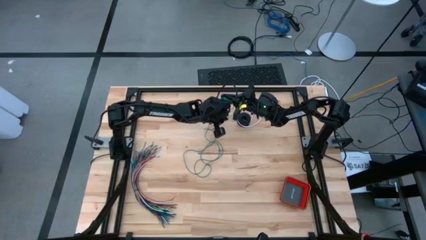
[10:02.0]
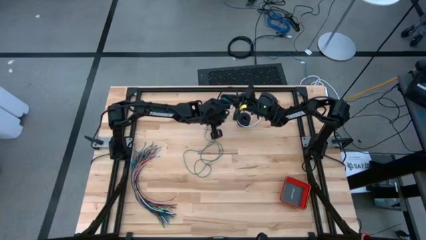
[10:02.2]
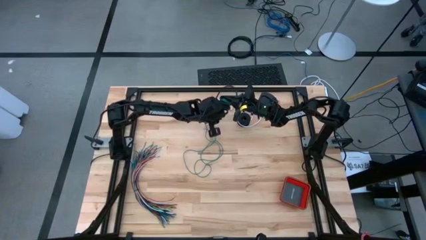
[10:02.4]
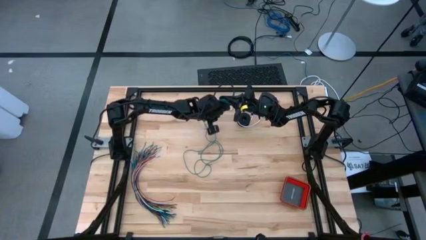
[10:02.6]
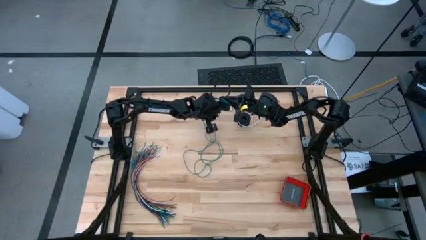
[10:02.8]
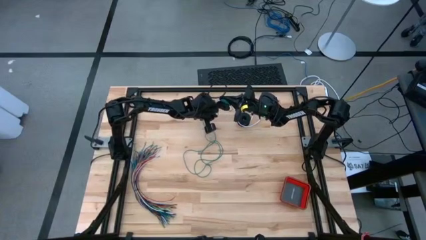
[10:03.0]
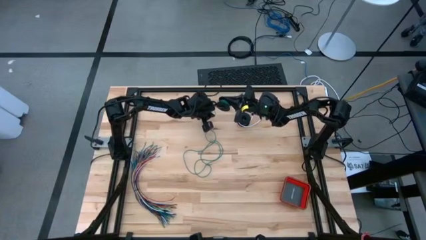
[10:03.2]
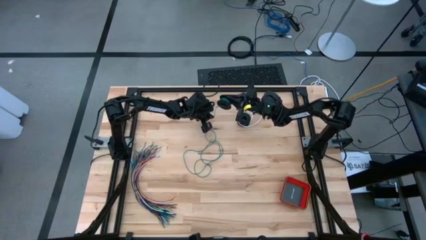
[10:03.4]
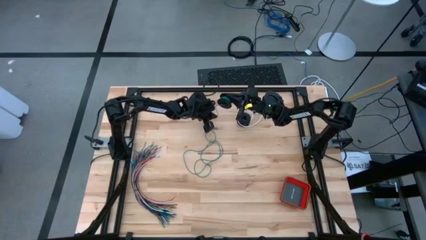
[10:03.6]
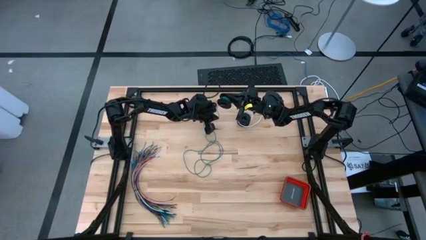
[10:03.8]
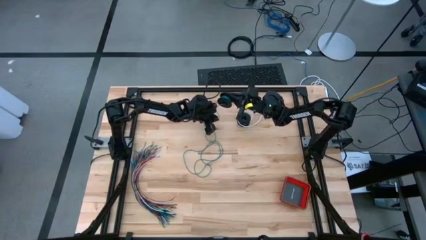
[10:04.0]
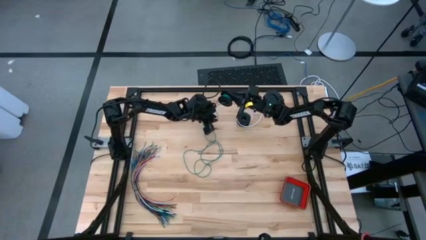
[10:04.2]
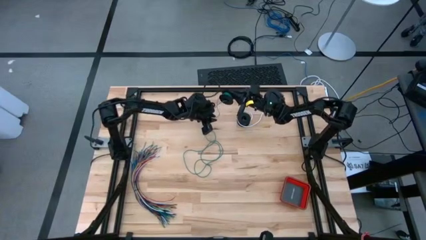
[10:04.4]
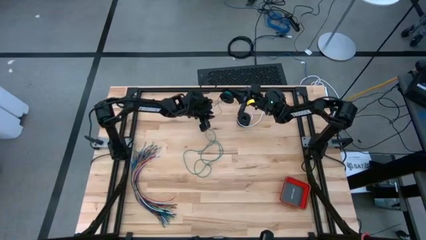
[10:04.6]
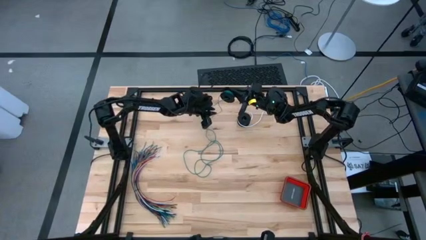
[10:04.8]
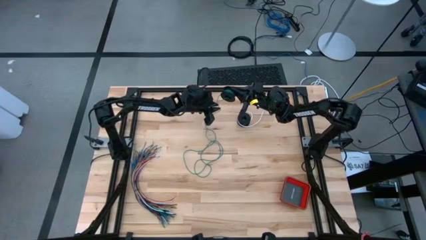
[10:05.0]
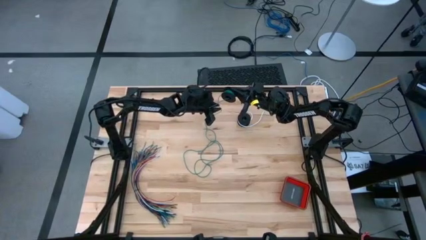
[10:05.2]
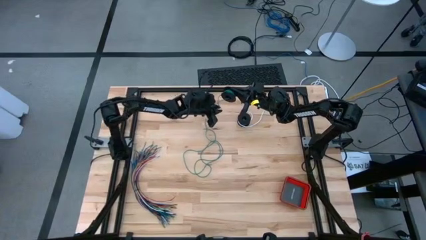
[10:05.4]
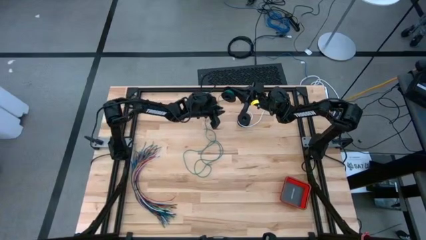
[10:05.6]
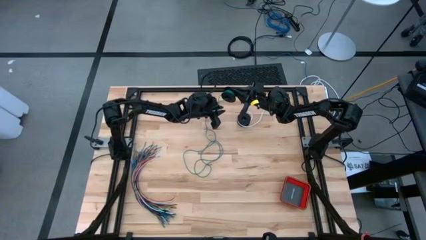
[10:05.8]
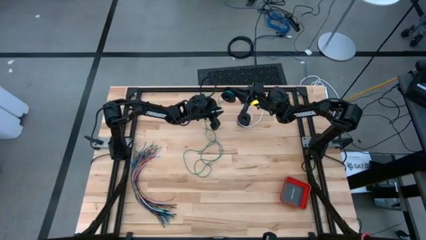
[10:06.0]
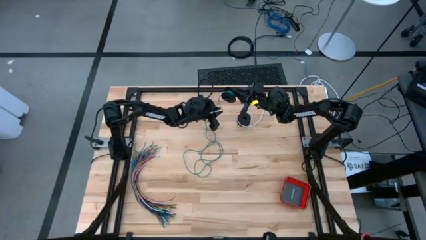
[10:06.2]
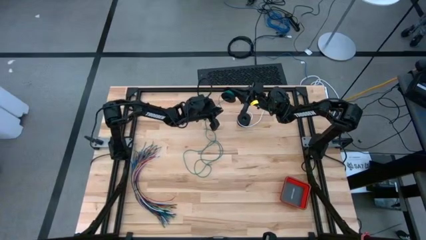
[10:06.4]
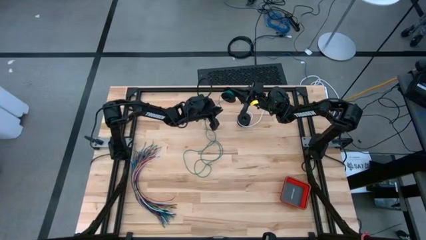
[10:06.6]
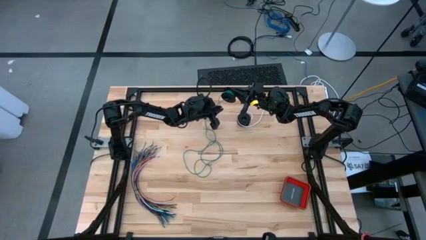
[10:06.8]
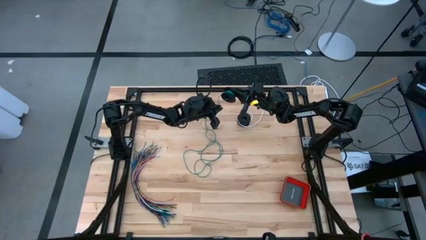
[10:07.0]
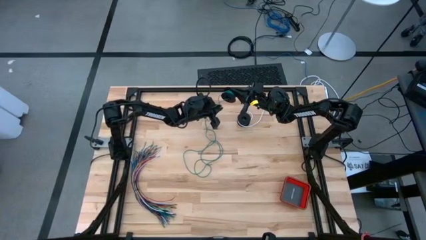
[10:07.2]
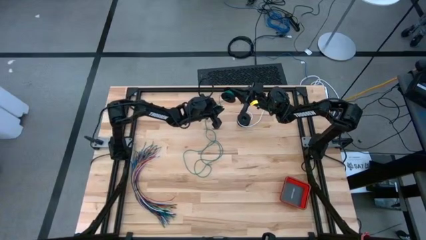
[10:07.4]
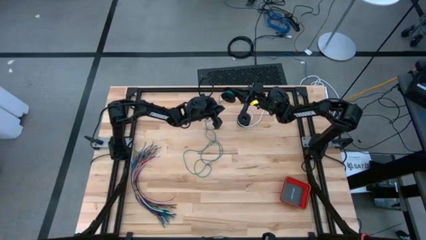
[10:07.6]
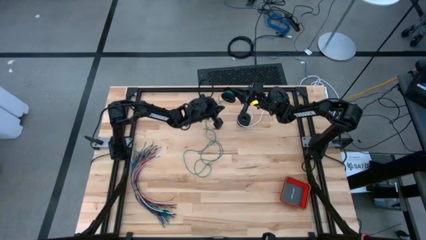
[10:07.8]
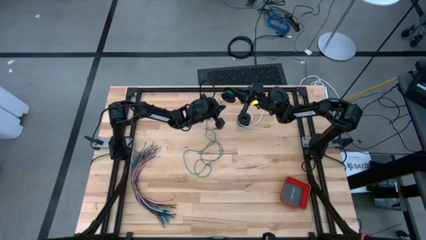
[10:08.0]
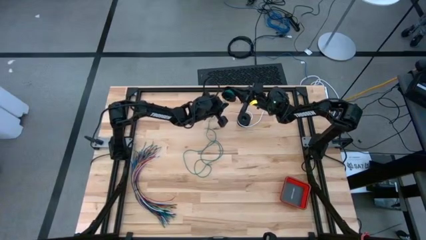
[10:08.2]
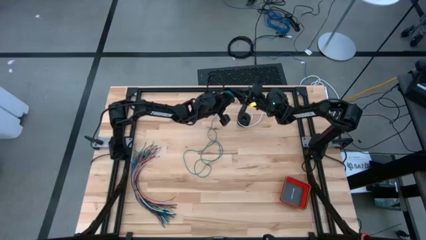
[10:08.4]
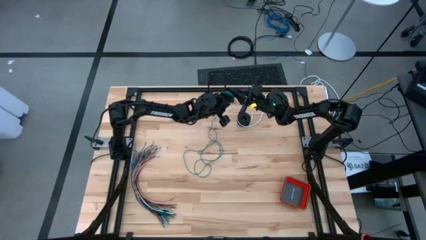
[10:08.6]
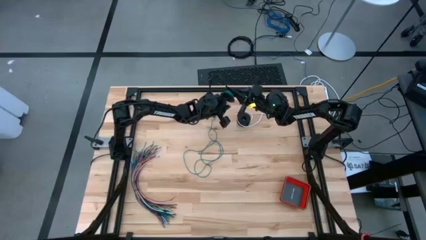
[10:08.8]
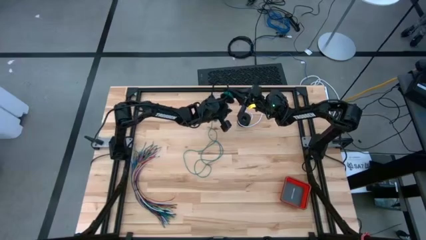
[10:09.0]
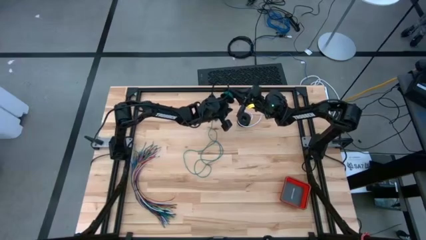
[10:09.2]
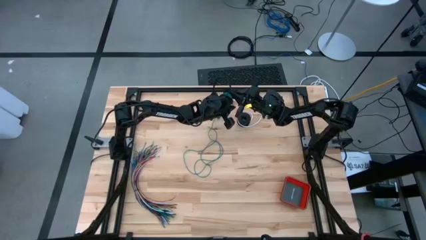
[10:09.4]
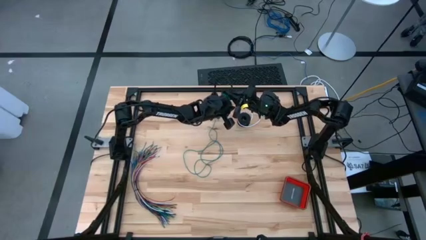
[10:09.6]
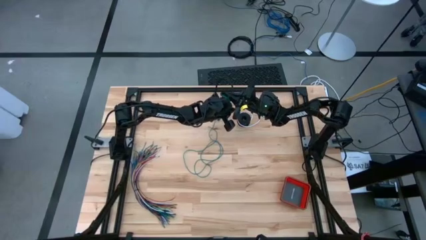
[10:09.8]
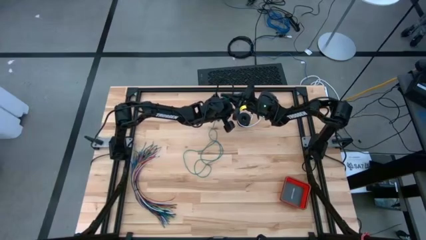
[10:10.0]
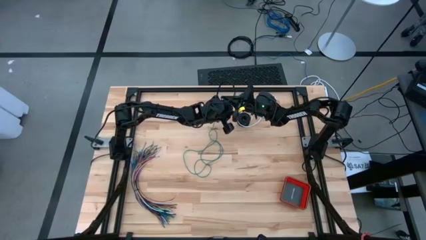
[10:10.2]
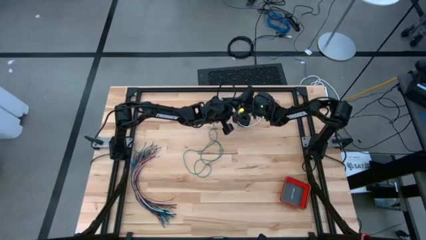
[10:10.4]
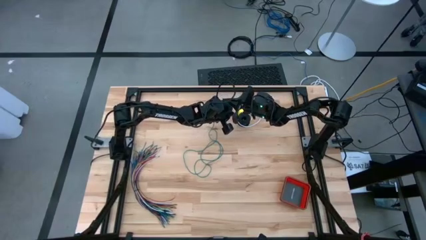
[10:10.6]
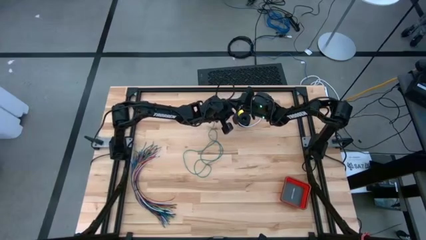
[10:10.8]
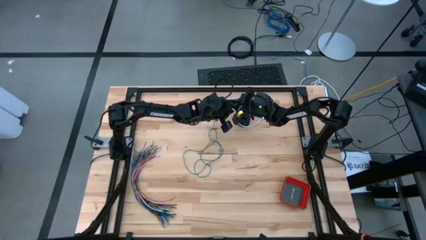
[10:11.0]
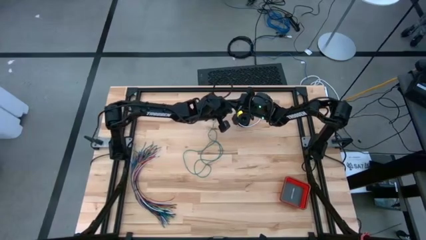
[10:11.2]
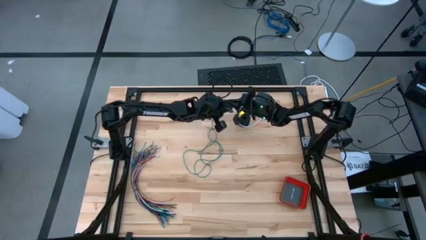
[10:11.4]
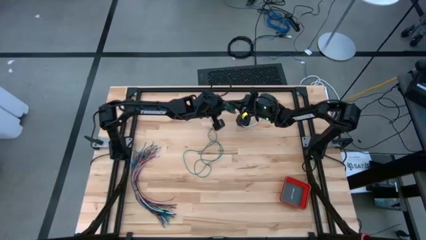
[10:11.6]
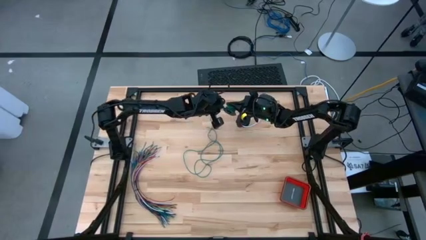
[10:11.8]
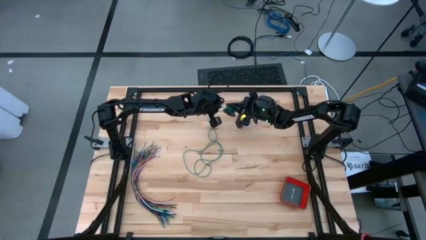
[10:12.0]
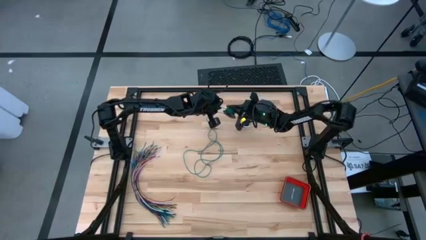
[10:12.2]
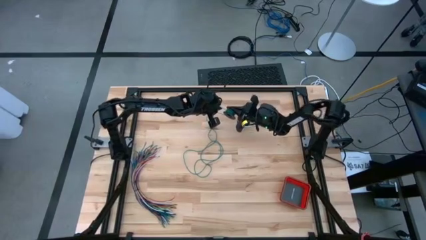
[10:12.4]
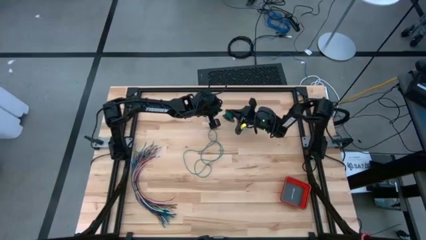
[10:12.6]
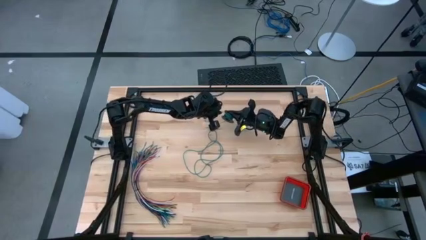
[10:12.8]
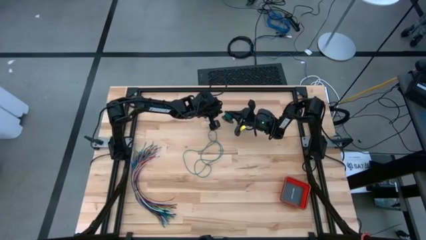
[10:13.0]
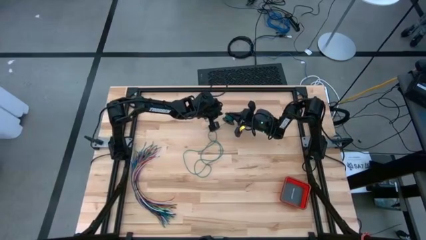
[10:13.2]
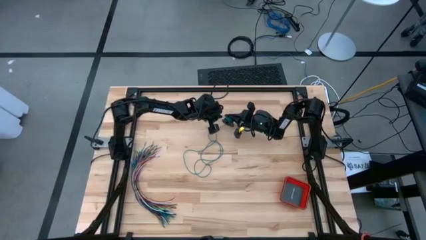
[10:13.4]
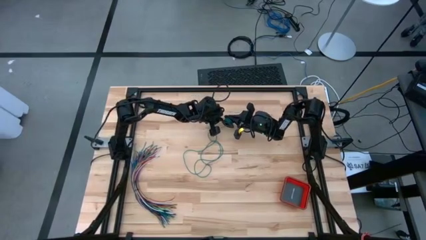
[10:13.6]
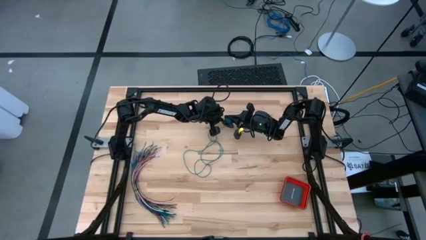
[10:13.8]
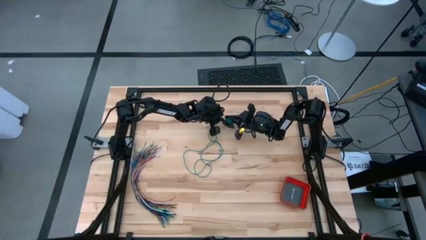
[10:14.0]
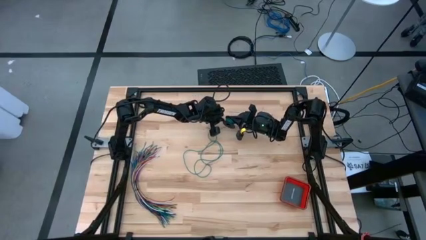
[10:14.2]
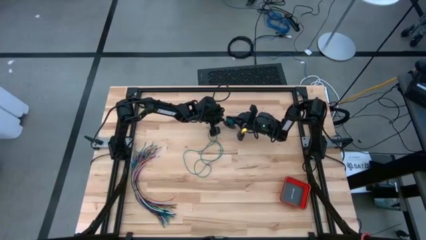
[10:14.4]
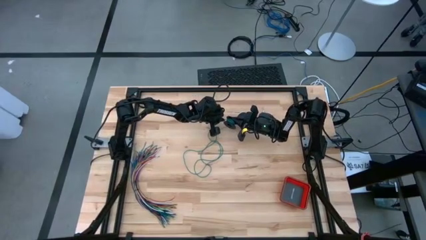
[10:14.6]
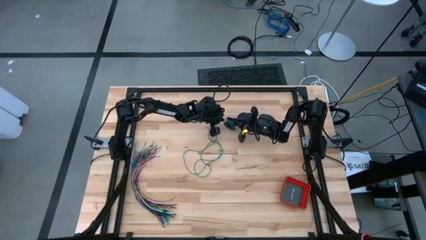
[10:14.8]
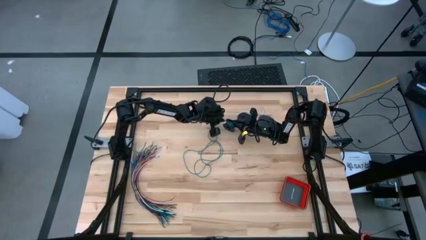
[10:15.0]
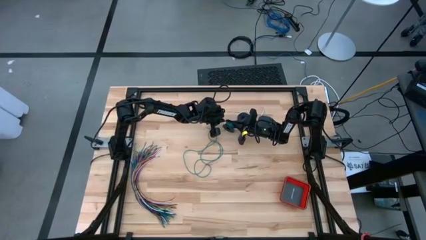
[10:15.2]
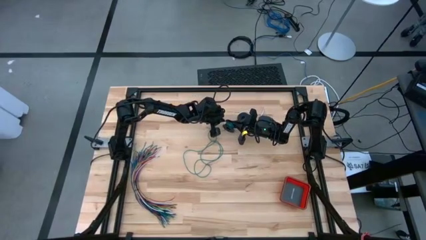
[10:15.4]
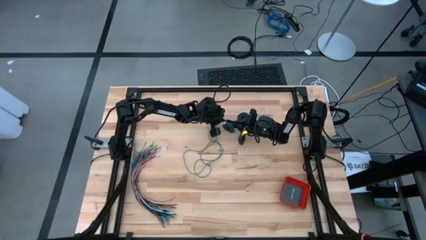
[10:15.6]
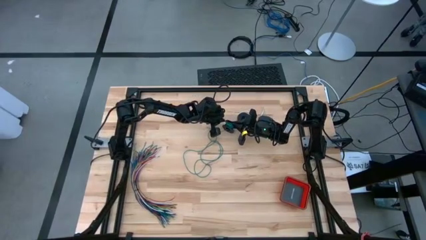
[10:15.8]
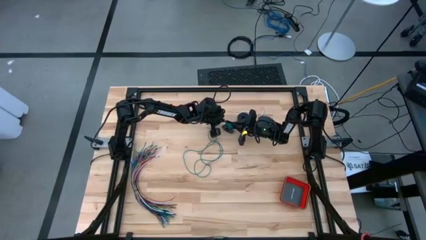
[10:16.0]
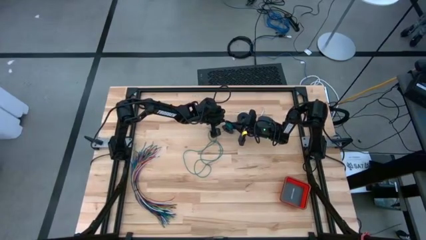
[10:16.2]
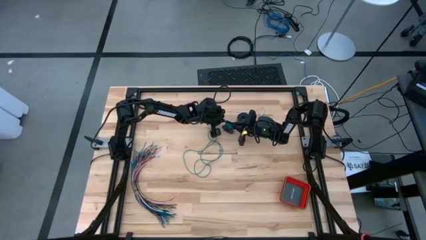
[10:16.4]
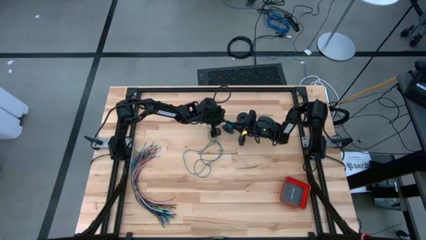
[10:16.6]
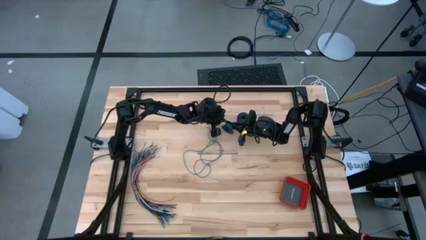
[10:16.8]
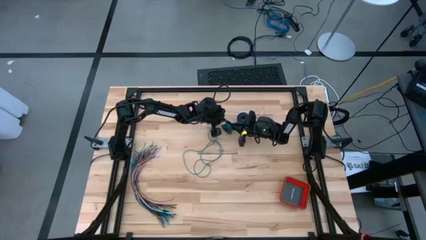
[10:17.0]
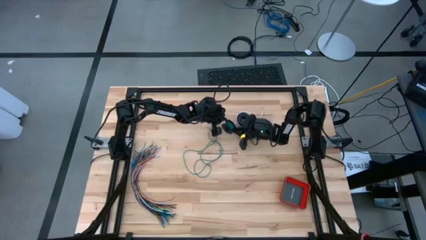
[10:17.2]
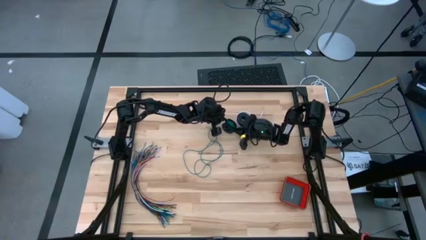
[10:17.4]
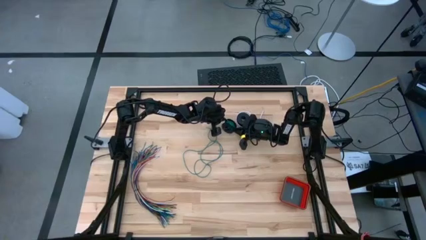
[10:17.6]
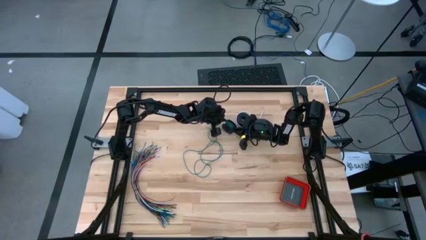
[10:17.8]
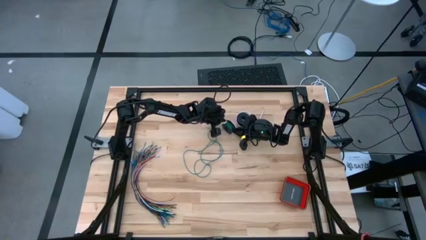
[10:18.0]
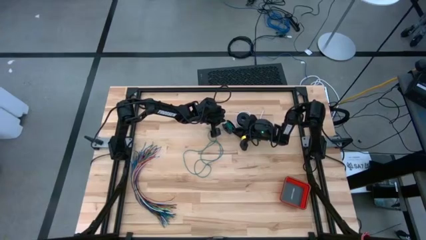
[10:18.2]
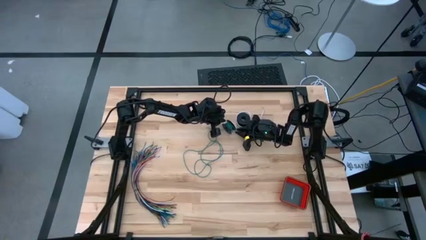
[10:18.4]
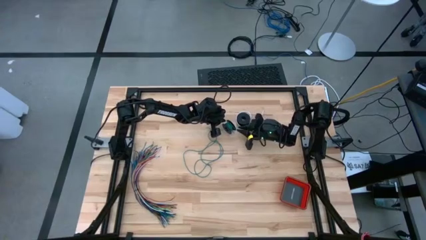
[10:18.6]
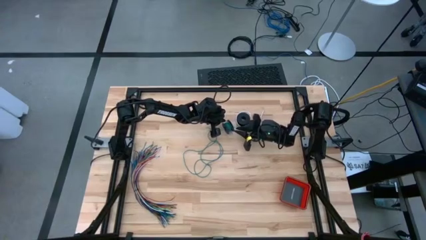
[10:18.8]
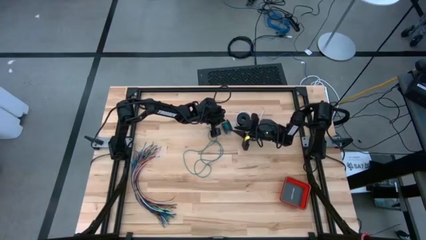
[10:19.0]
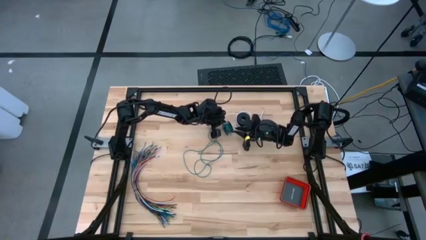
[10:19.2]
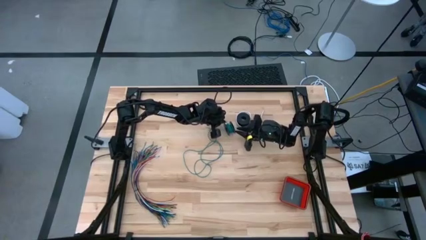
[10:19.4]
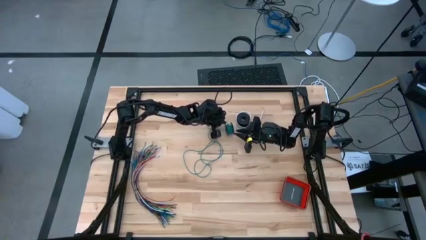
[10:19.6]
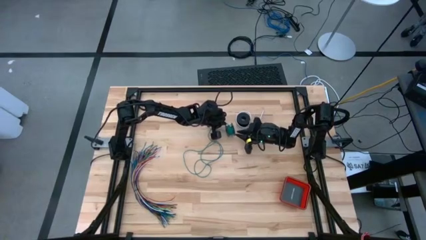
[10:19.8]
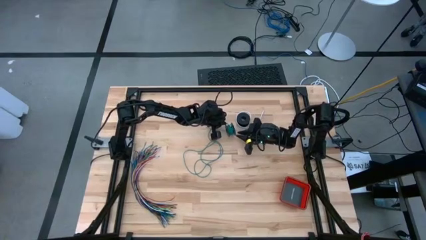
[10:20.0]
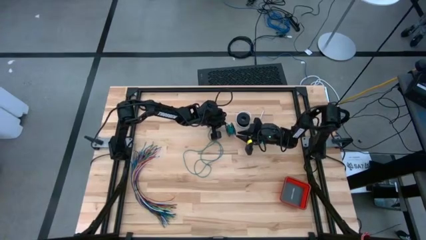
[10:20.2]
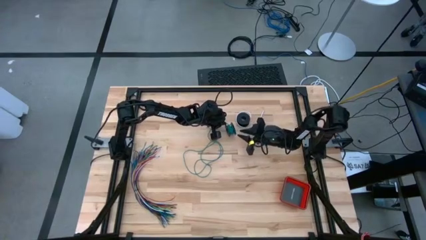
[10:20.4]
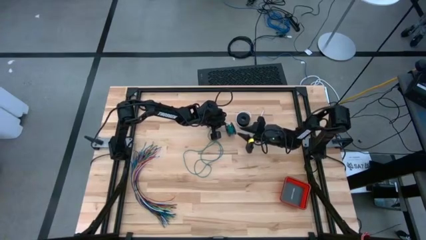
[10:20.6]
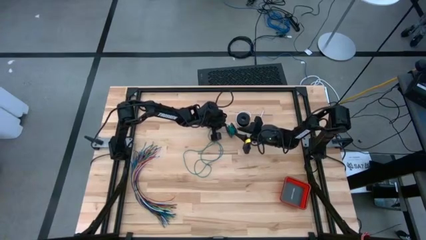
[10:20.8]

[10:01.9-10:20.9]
Task: Coil cords
Coil the green wire onto the spool
